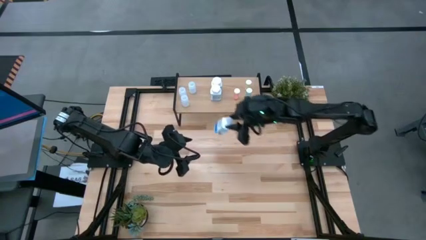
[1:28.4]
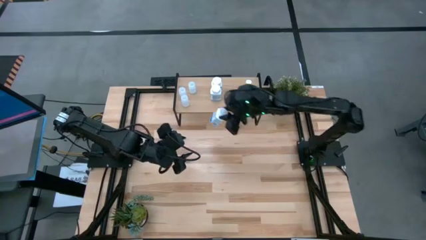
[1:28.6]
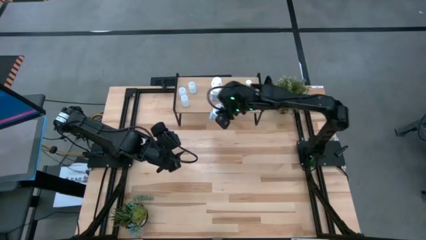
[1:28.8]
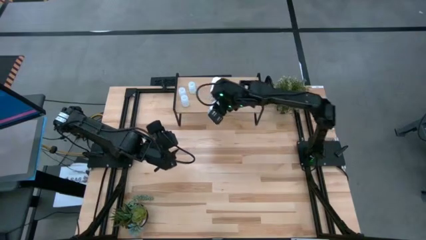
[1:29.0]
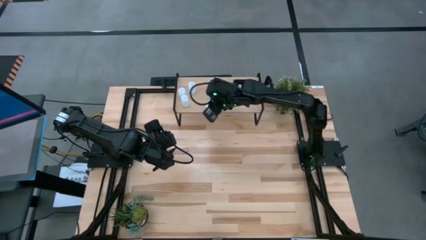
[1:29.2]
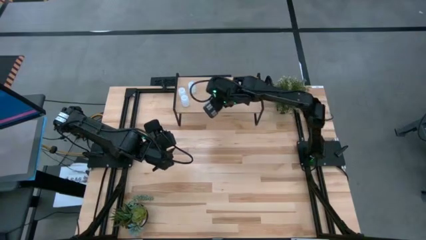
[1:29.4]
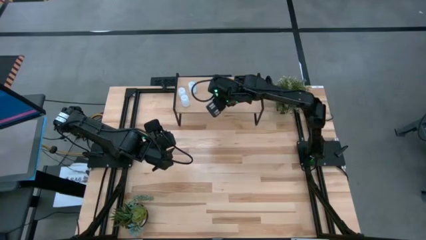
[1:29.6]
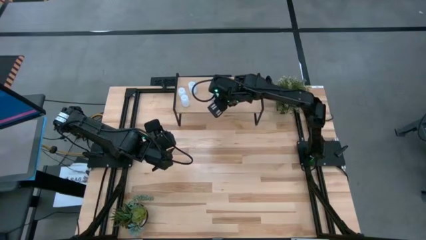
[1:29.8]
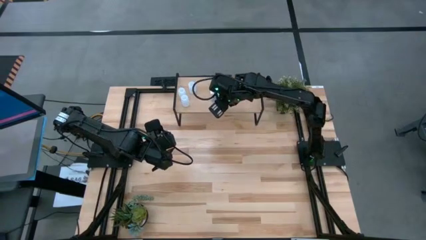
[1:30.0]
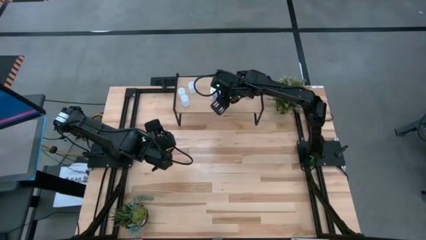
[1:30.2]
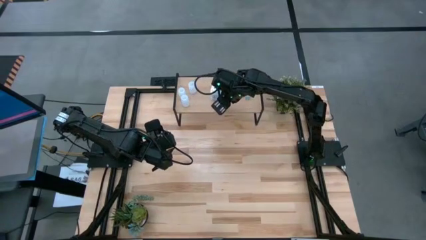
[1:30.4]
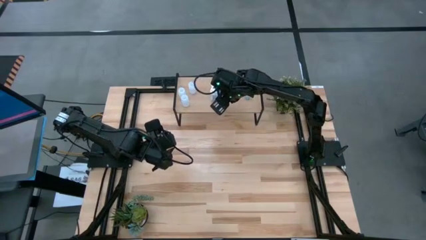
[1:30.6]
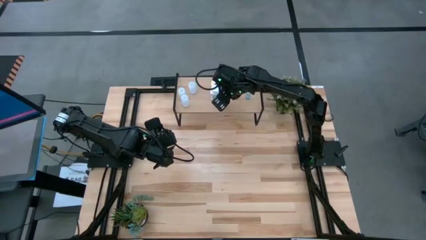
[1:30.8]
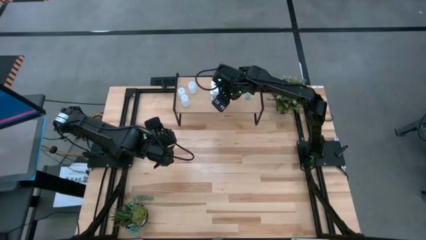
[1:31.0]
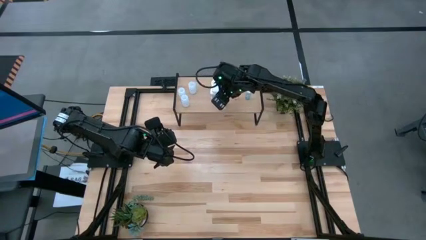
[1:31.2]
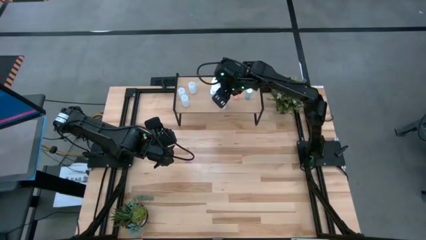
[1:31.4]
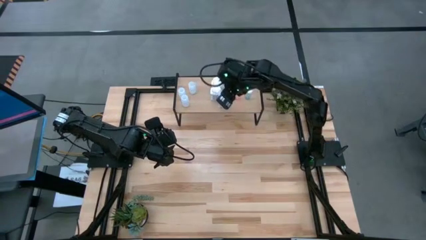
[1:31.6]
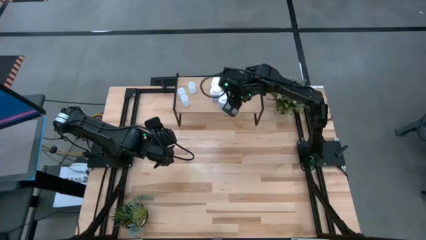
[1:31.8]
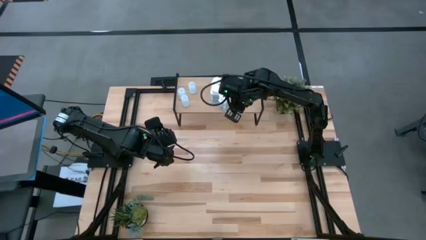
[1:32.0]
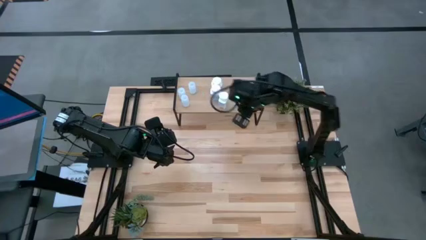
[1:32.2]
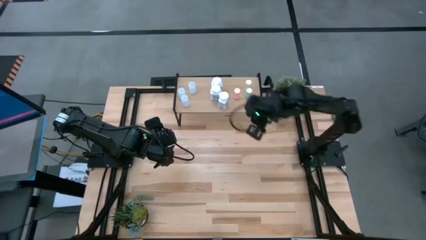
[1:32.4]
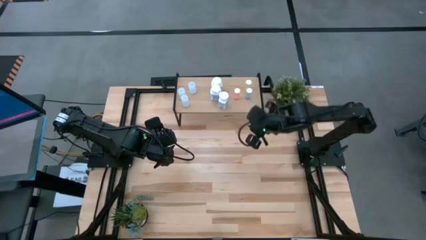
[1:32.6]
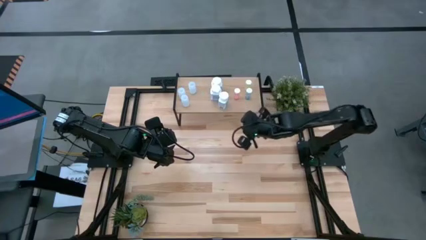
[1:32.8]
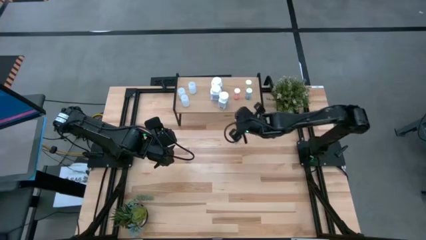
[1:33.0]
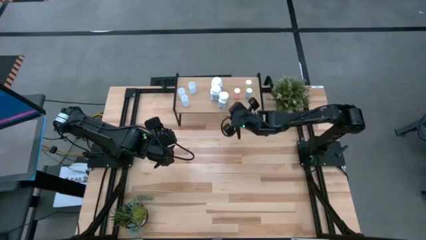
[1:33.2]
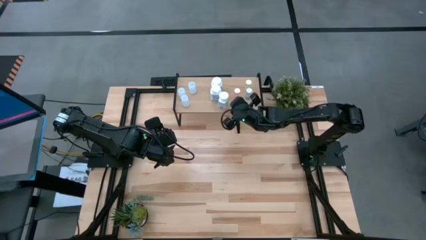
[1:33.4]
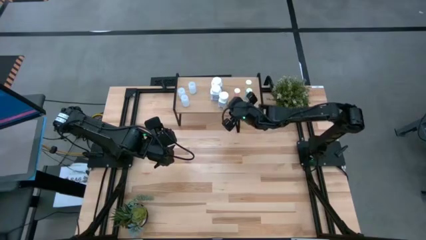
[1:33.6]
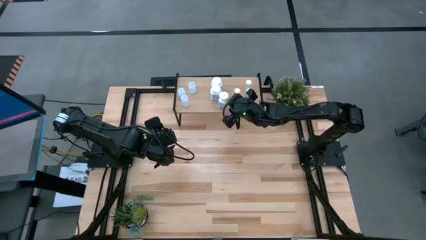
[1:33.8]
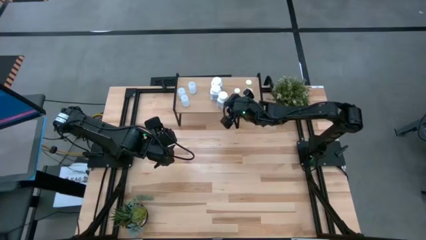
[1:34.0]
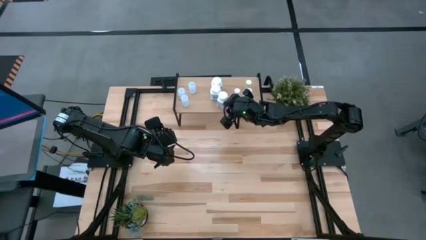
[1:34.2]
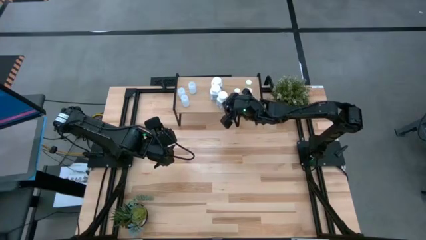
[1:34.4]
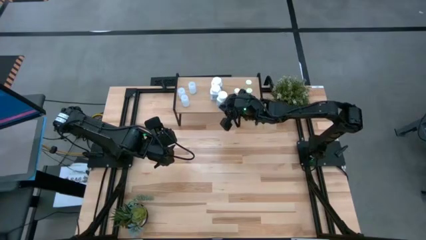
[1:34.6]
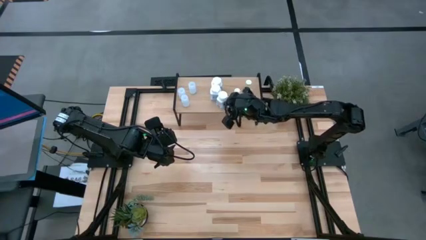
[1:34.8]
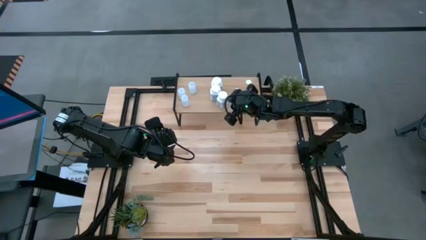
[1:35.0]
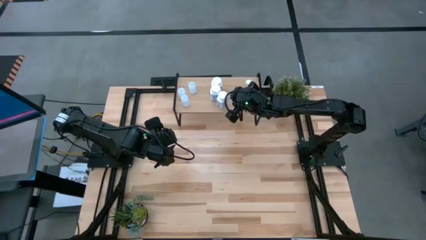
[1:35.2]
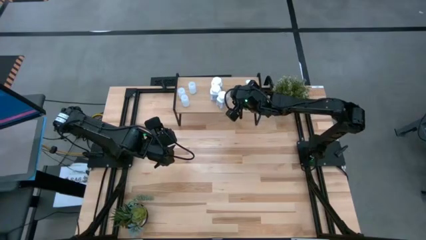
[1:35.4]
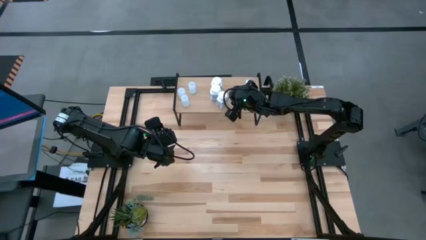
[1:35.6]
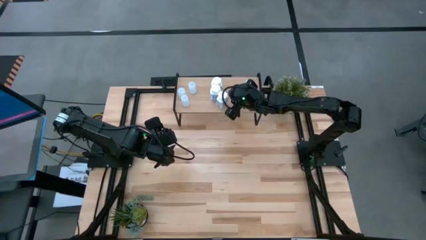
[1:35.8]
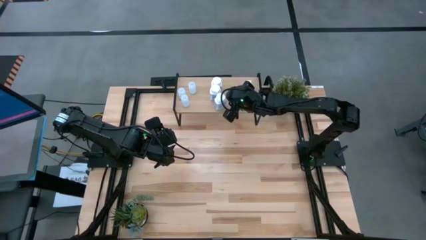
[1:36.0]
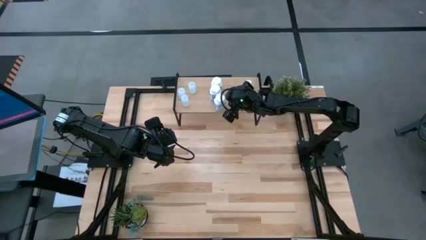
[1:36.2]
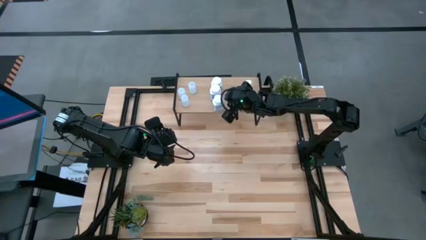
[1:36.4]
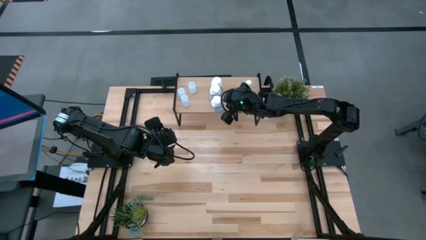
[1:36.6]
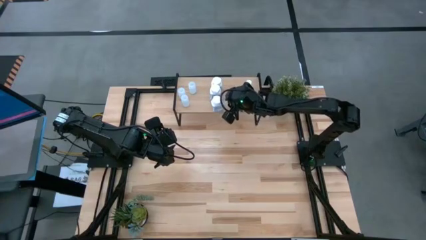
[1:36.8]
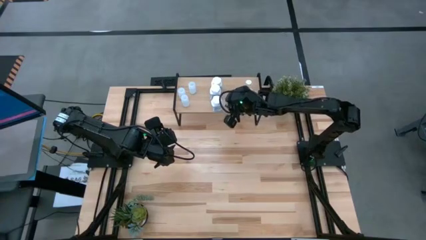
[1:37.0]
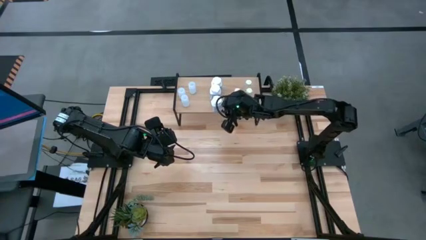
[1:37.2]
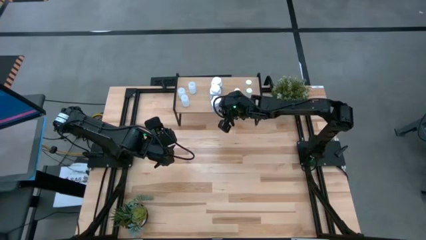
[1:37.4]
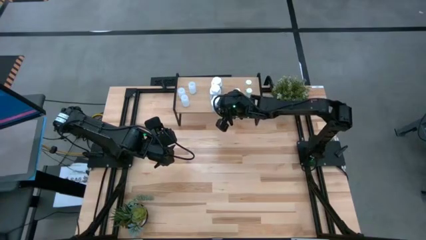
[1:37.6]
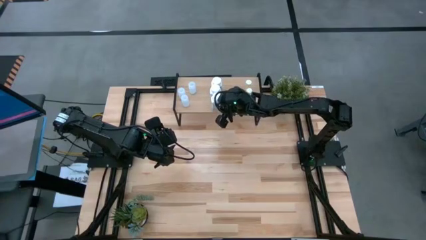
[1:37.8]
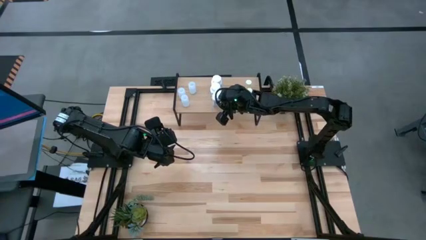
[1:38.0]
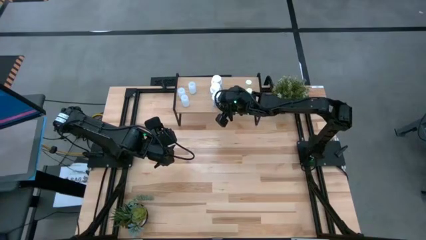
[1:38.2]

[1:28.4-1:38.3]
Task: Pick and place medicine bottles onto shelf by color
Put the white medicine bottle on the shelf aligned with the other white medicine bottles

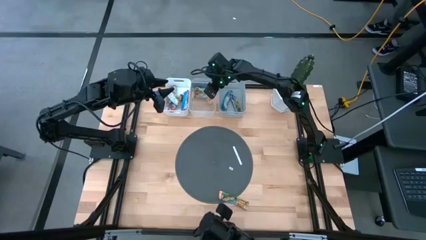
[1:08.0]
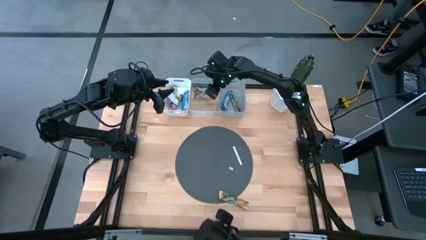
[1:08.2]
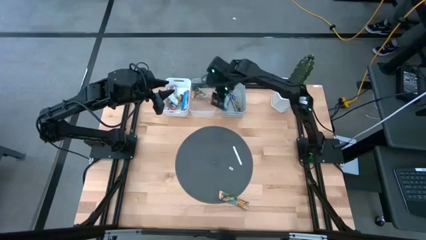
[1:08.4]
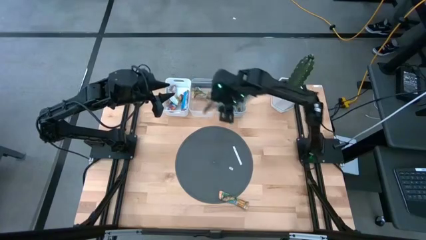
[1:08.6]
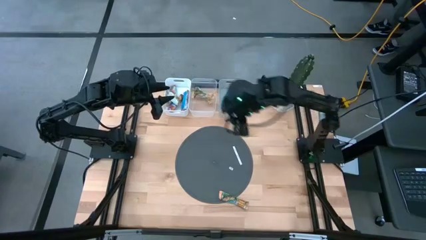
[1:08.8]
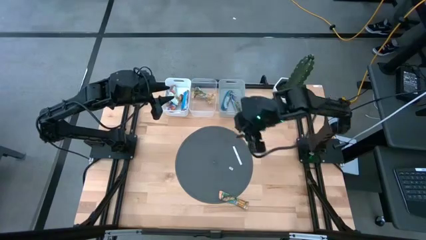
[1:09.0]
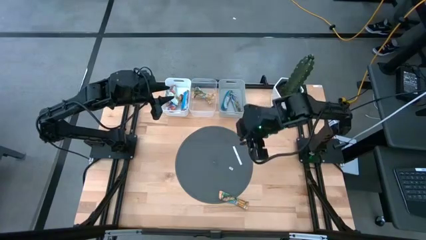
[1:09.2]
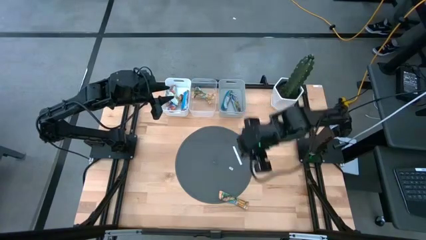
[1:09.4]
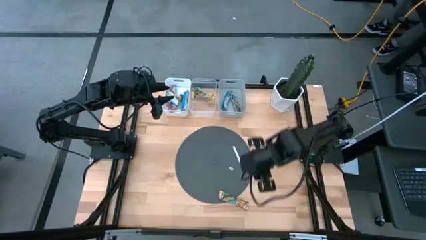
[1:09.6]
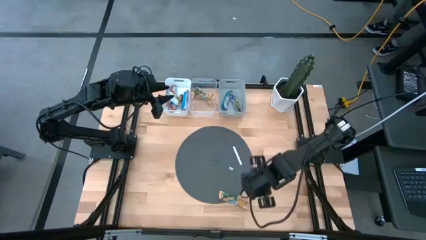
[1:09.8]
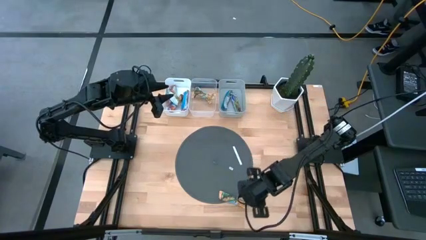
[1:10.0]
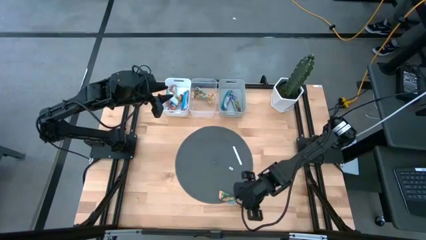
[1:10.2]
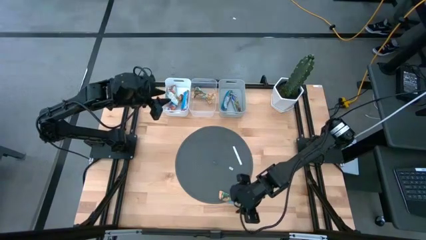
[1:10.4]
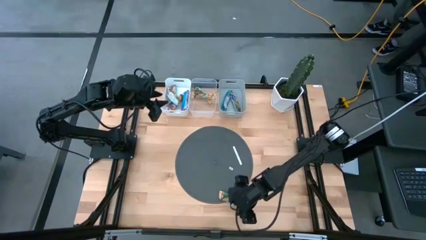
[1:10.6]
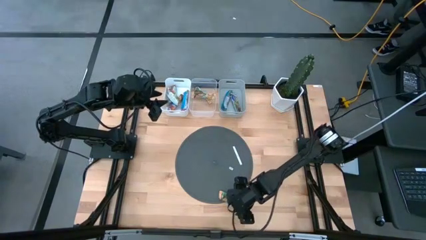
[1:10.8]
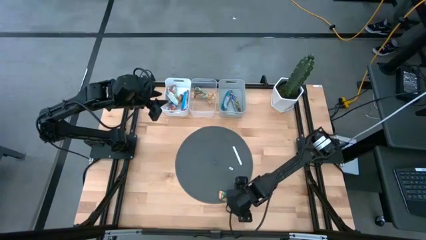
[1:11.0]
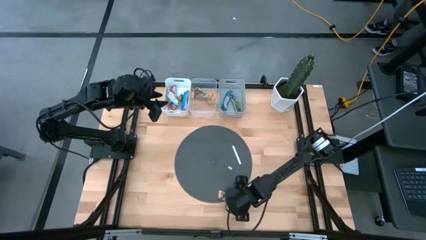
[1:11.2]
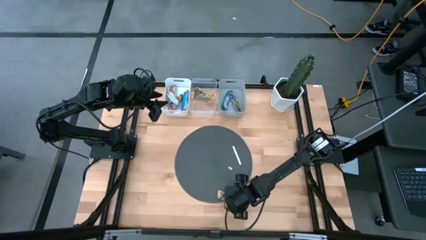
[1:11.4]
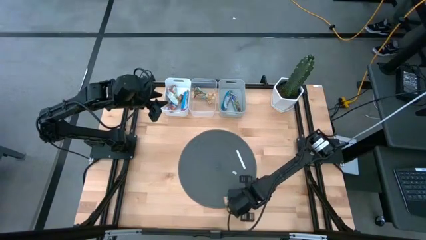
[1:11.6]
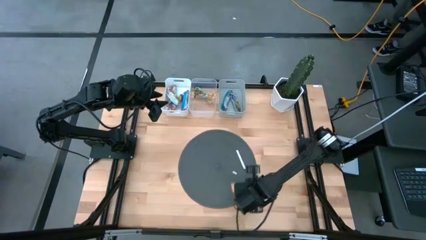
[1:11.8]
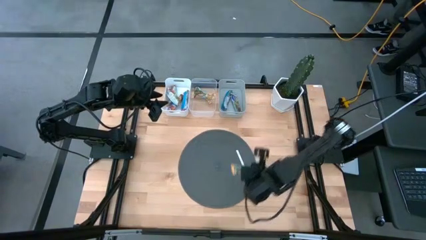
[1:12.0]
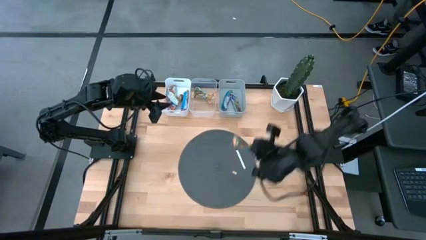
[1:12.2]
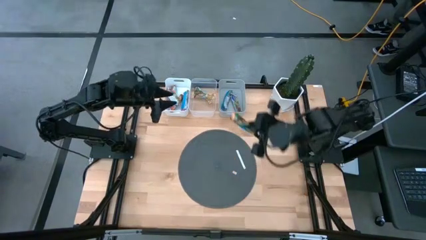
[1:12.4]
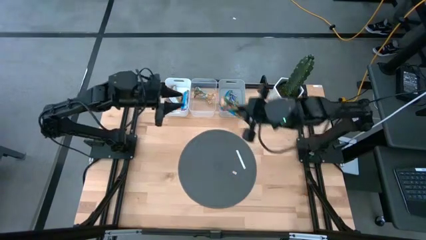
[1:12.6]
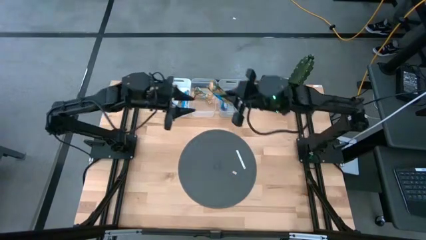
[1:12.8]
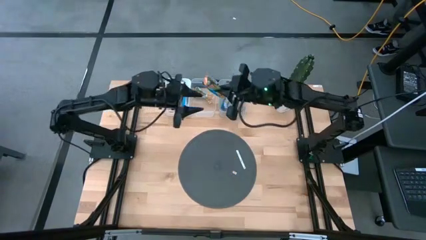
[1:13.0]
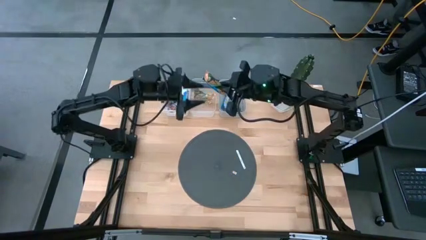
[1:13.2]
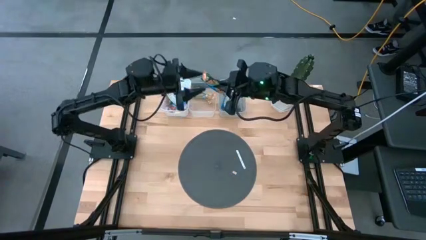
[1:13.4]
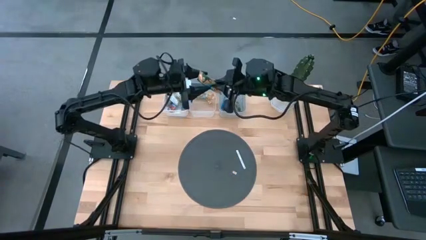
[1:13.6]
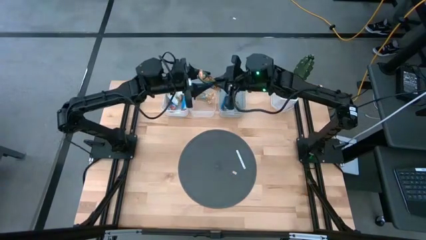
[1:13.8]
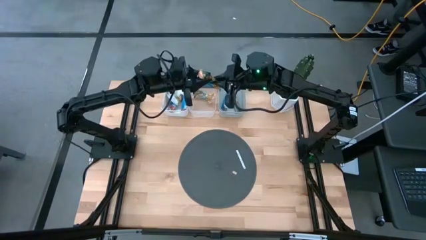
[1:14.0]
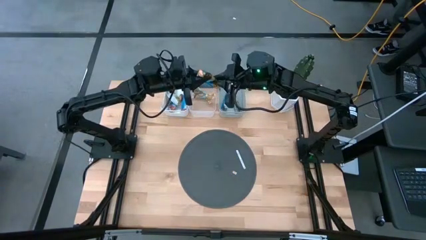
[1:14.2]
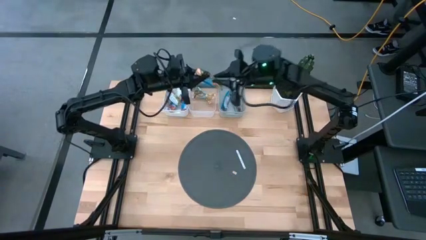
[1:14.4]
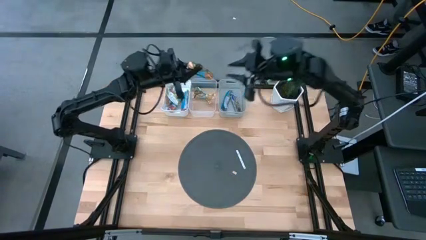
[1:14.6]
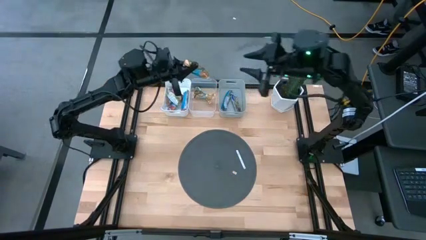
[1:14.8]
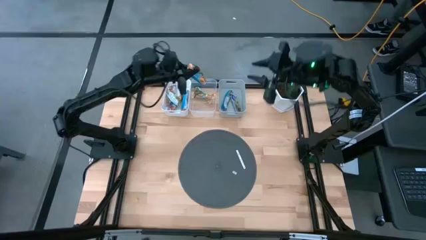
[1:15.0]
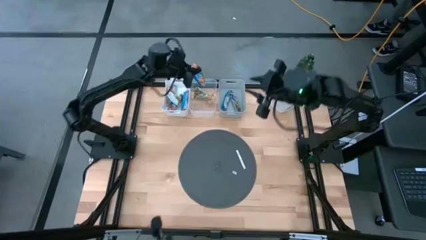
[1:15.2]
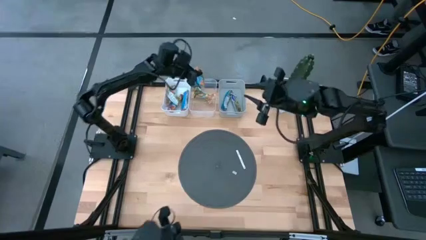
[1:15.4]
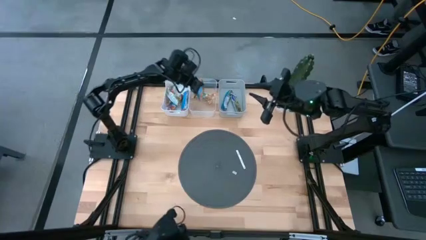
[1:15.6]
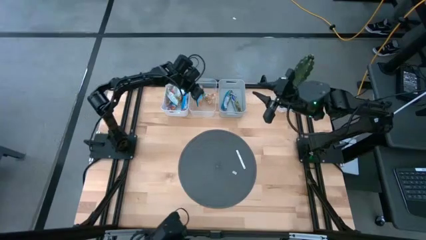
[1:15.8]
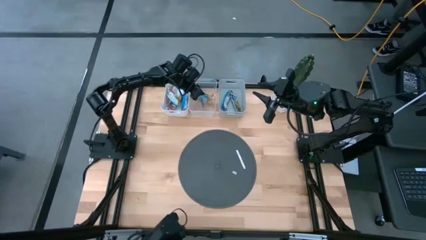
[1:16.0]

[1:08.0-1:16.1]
Task: Pick and place Granola Bars by type
Put the yellow granola bar into the transparent bin
